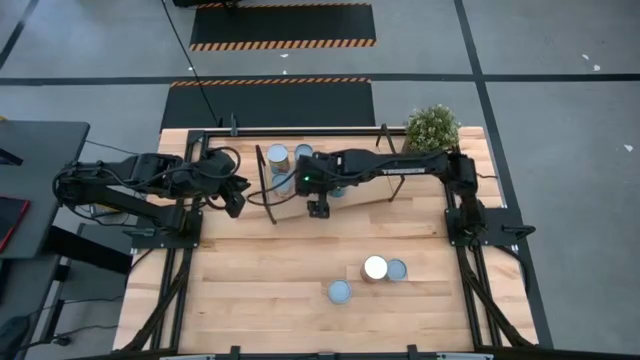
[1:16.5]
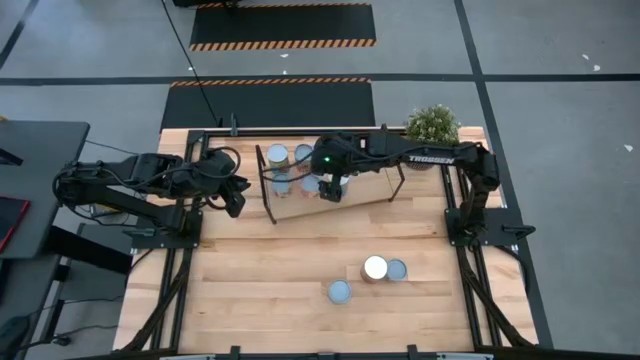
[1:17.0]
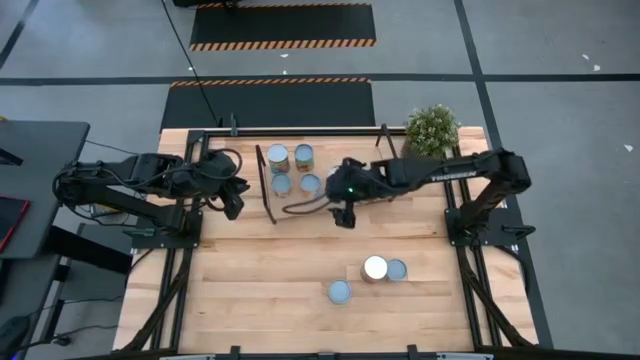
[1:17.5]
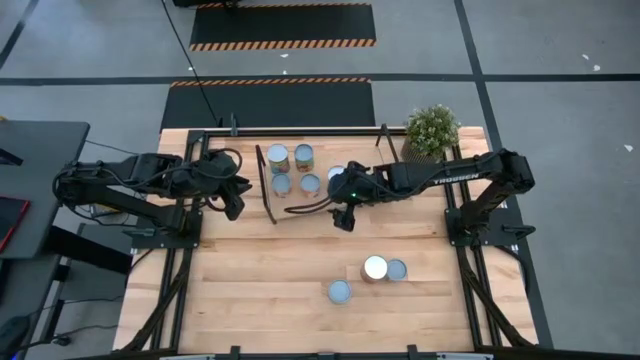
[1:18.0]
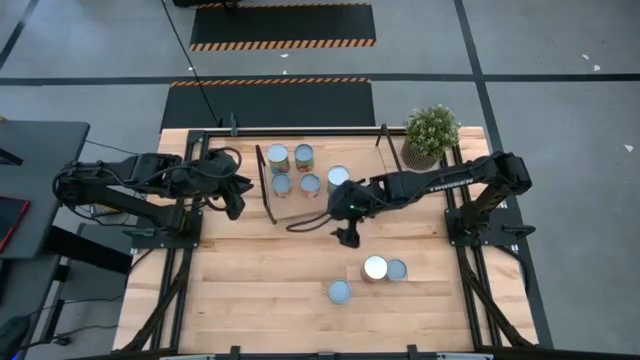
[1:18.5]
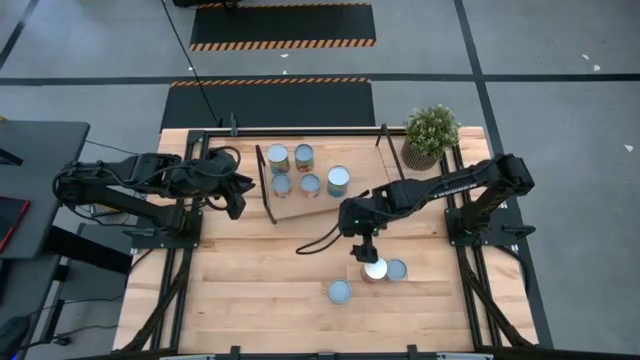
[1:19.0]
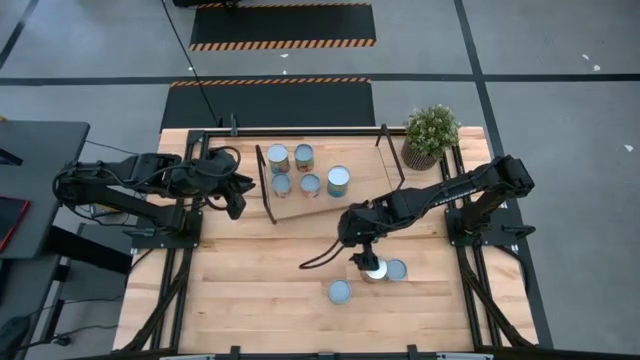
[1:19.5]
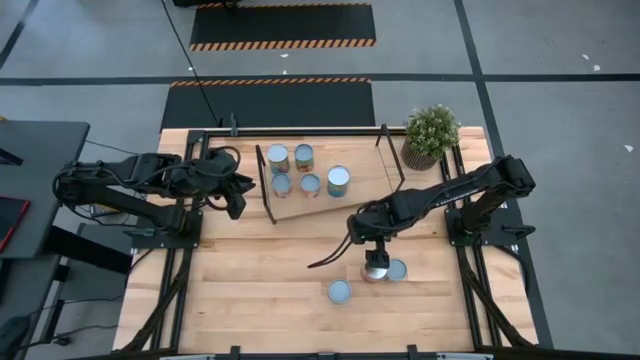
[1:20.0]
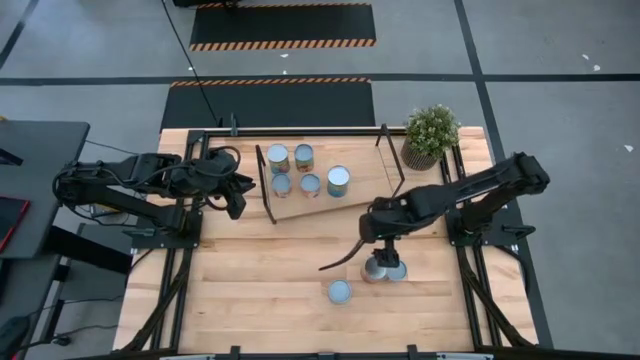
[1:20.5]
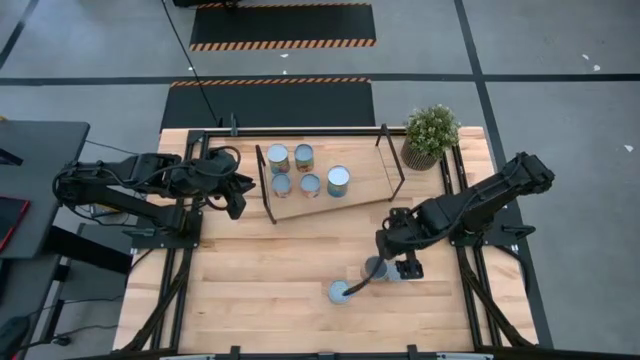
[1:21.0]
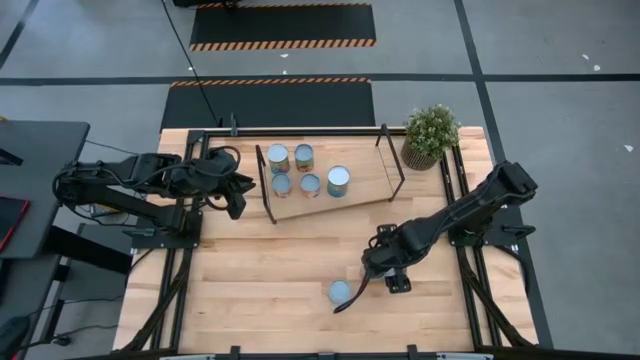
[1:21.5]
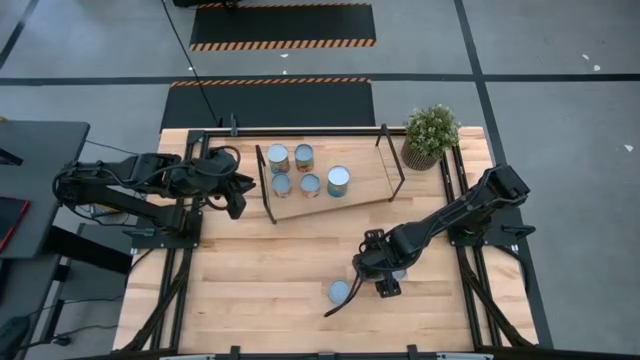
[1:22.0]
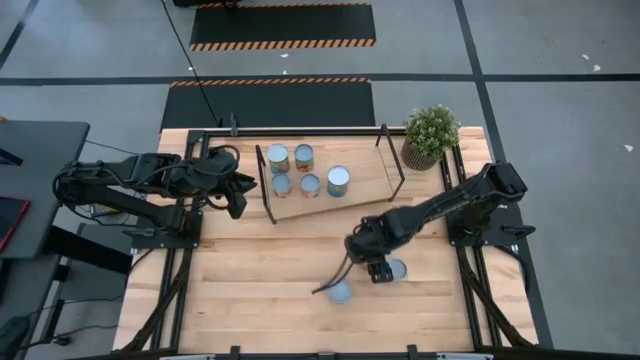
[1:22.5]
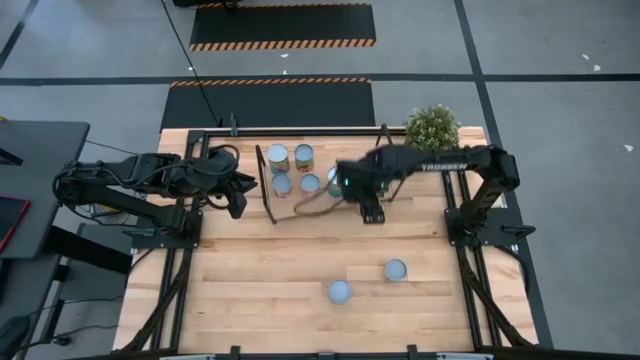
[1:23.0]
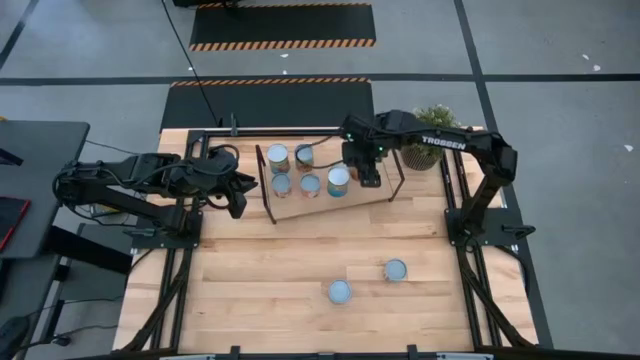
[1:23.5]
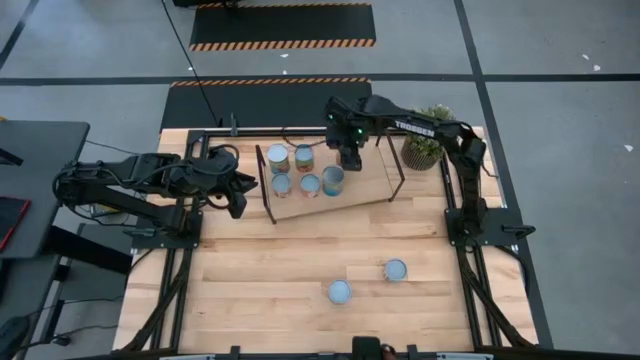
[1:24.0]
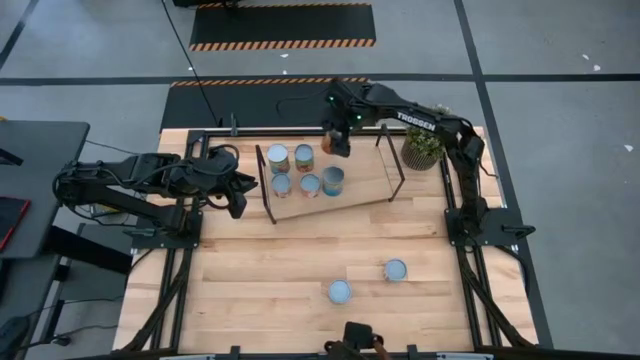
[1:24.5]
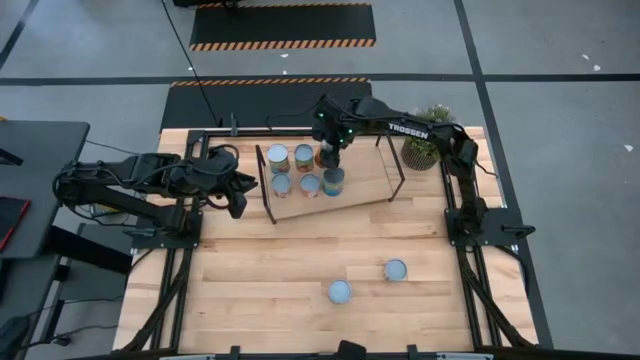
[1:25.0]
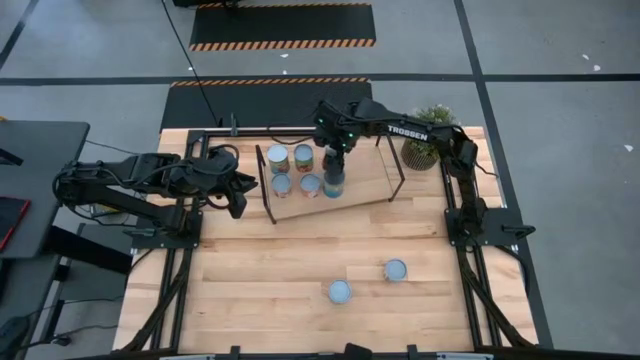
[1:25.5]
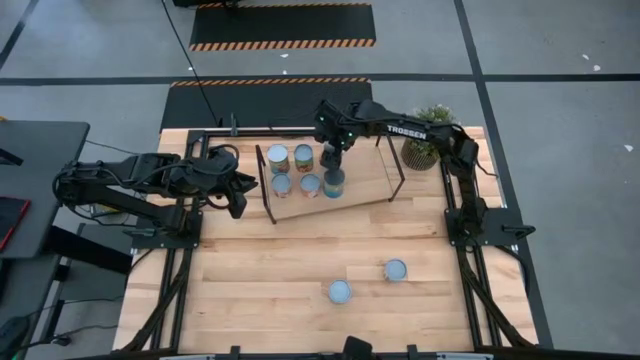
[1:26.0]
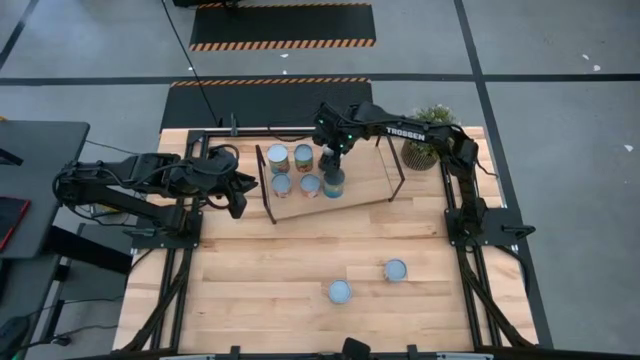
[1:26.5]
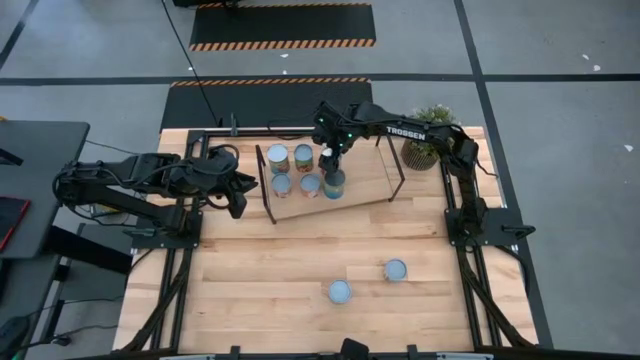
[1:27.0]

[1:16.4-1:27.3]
Task: Pick and place cans onto a shelf
Put the canned pineapple on the shelf

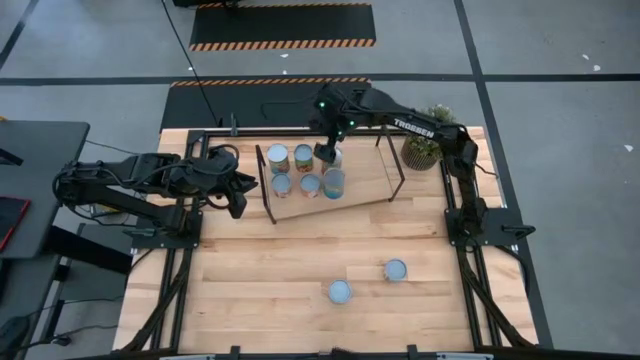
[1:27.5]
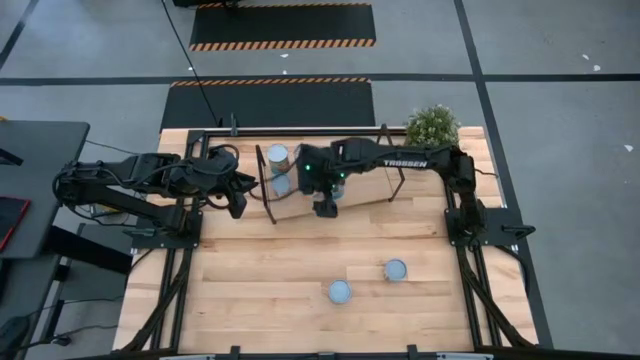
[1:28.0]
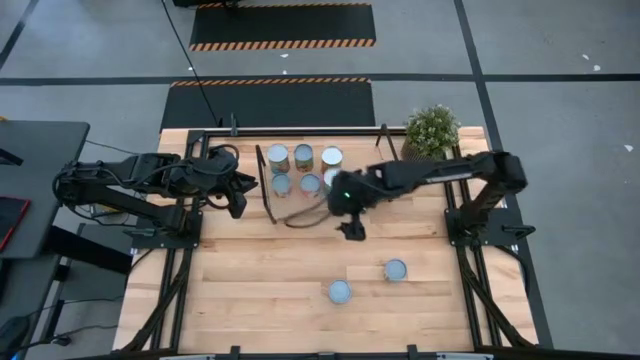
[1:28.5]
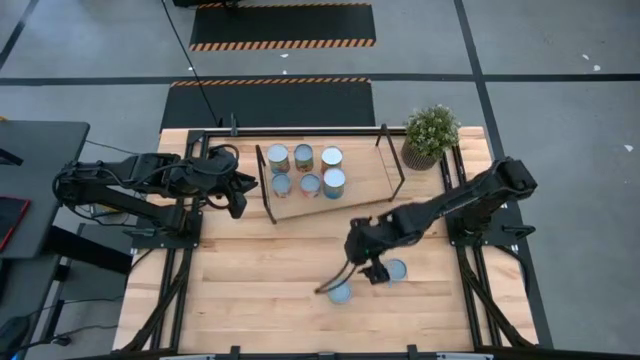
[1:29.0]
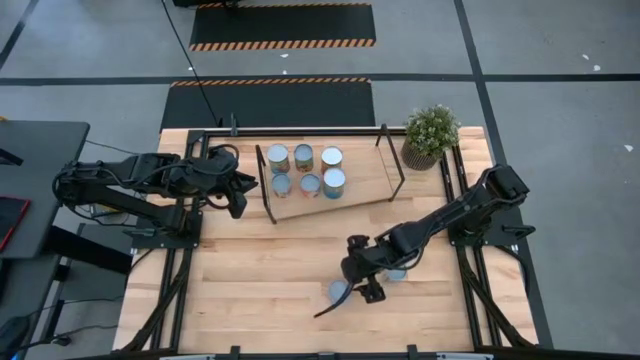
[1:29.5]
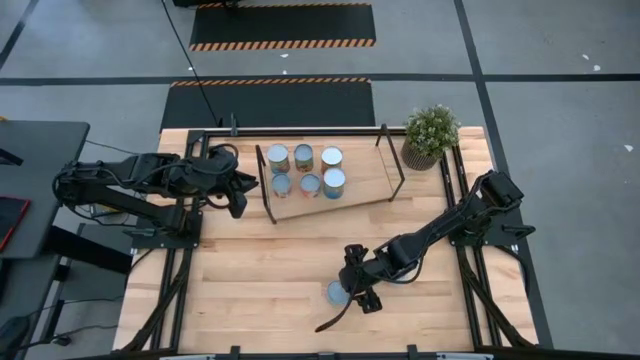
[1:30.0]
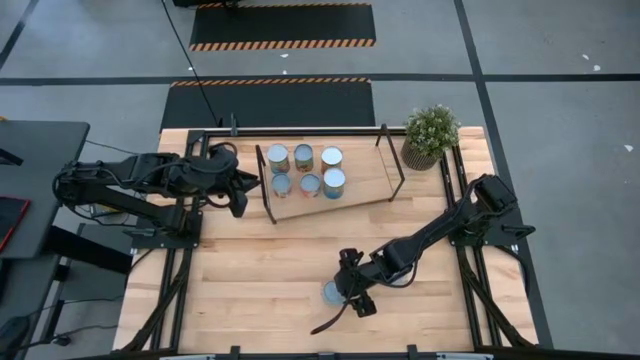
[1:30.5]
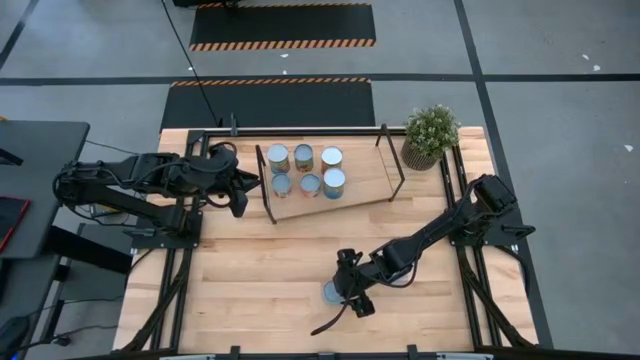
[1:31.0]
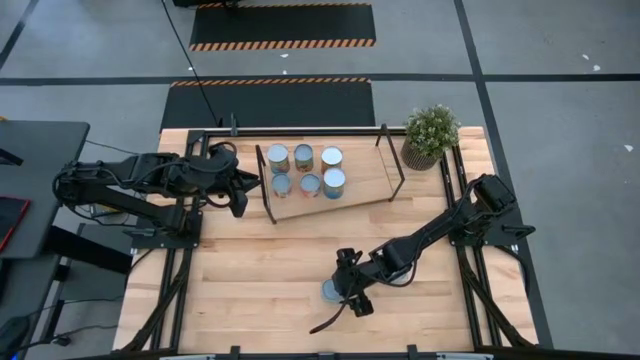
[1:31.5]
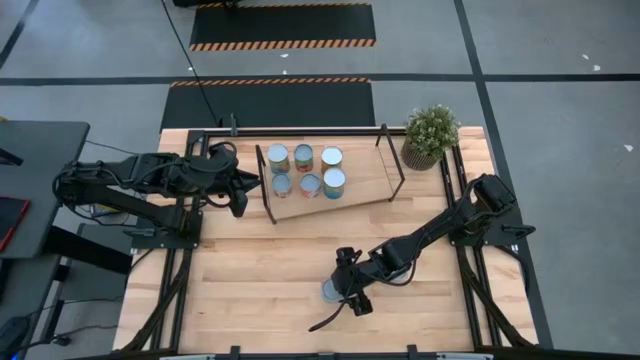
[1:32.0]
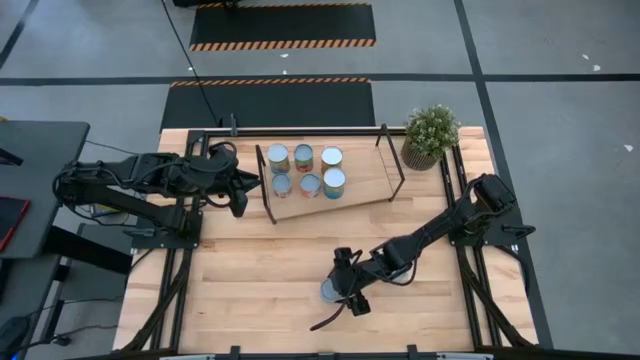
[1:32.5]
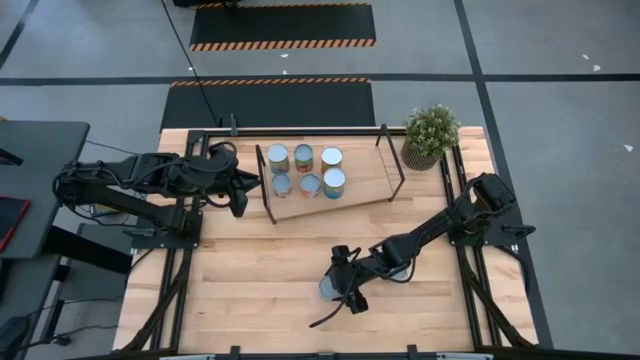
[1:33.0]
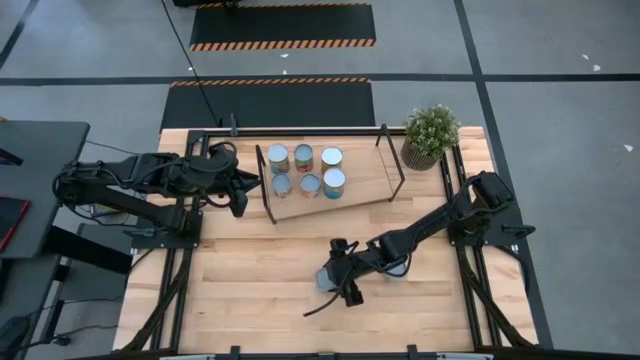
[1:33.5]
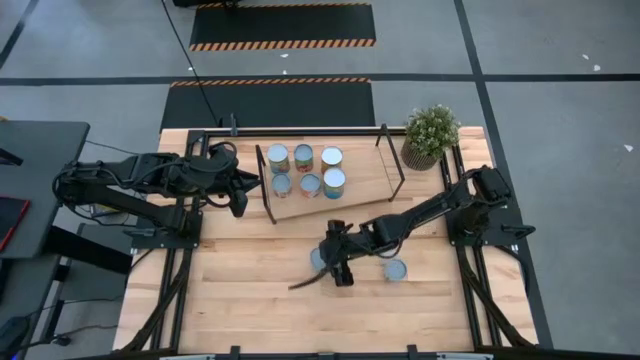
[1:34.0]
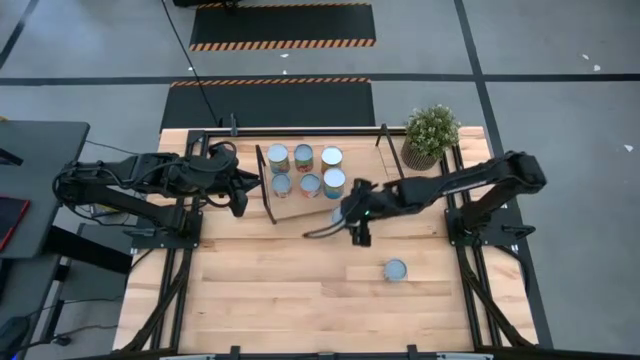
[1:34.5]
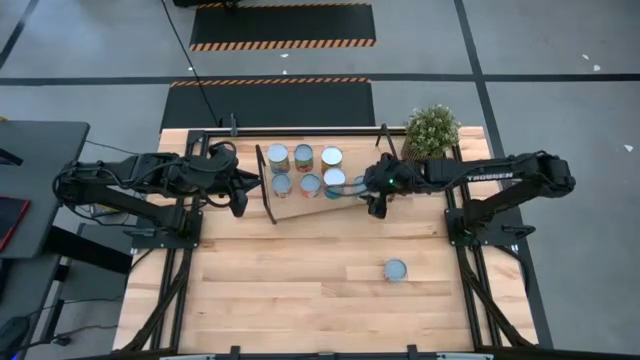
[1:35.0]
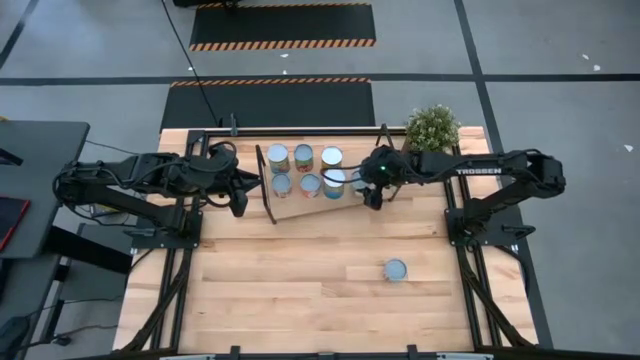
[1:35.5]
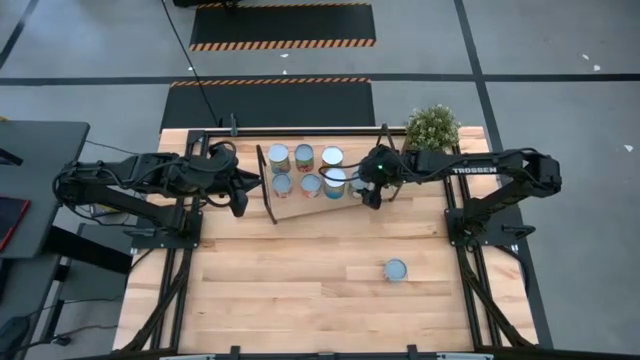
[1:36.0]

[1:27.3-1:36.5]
Put the canned chicken soup on the shelf
